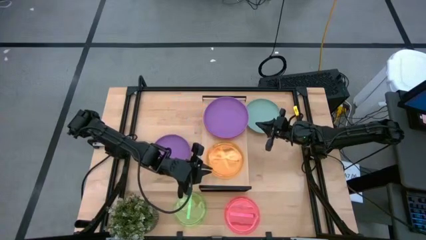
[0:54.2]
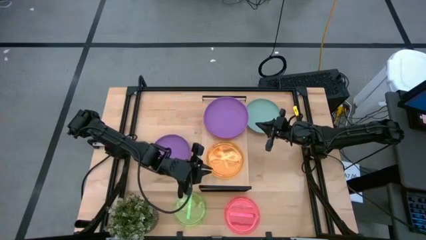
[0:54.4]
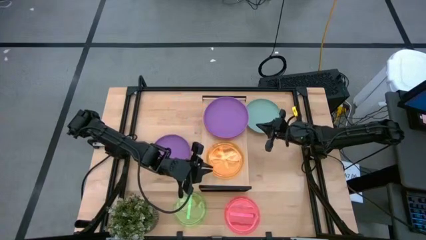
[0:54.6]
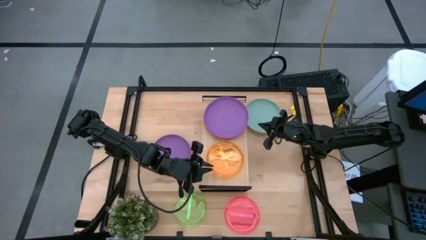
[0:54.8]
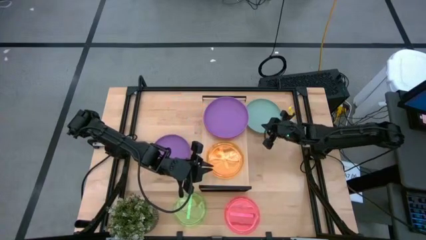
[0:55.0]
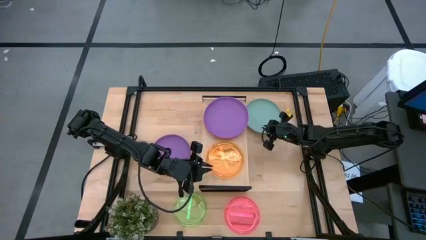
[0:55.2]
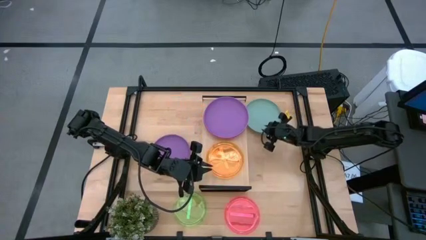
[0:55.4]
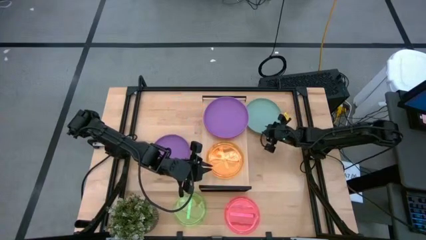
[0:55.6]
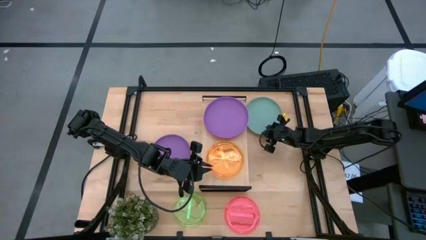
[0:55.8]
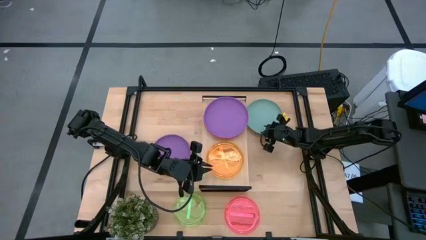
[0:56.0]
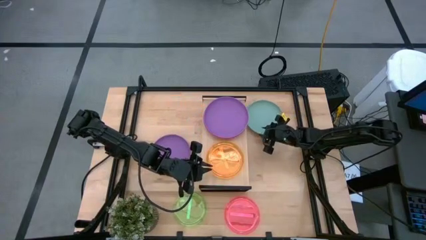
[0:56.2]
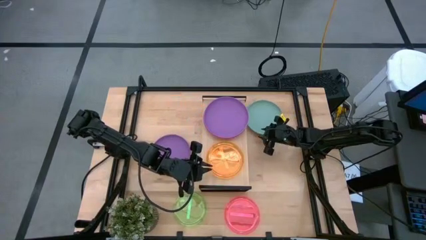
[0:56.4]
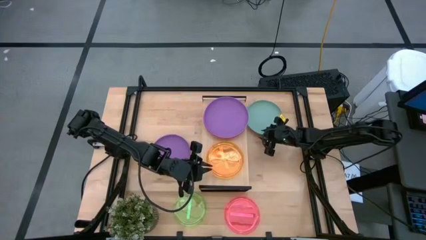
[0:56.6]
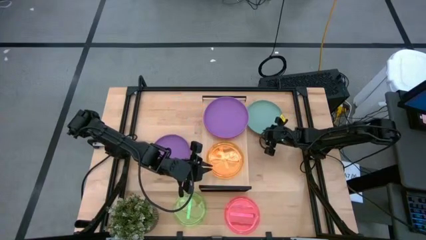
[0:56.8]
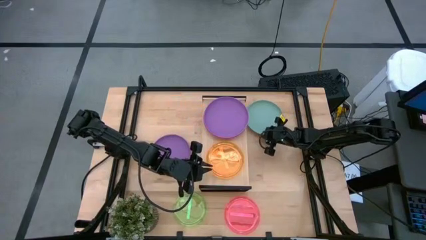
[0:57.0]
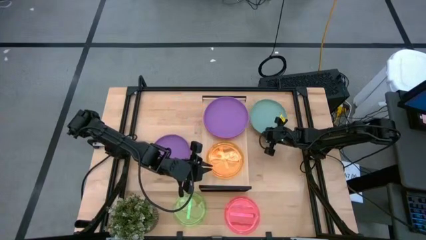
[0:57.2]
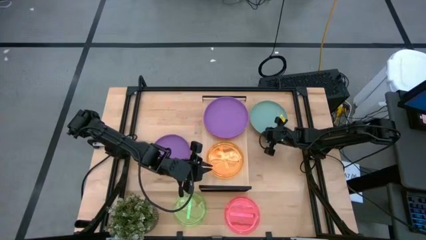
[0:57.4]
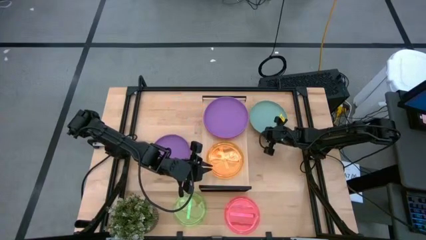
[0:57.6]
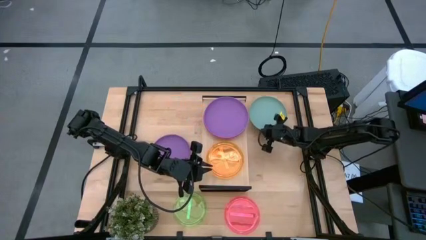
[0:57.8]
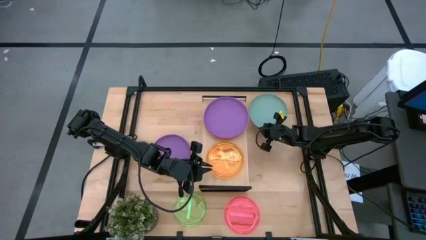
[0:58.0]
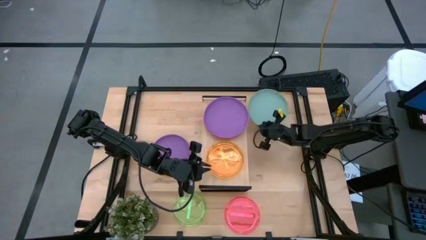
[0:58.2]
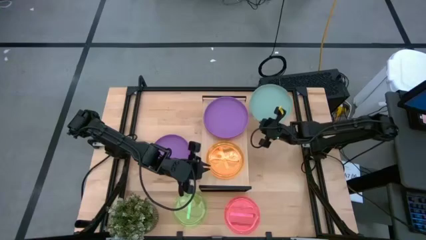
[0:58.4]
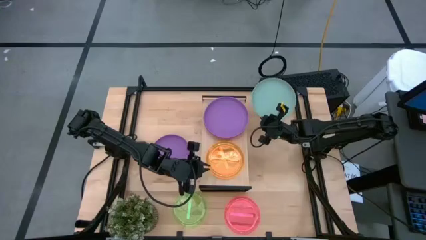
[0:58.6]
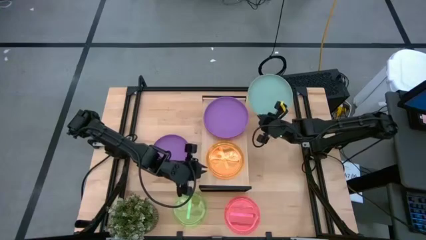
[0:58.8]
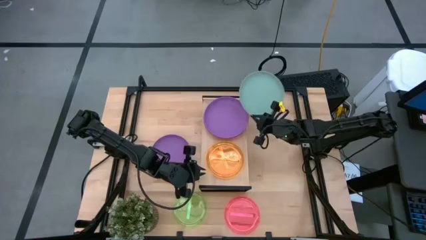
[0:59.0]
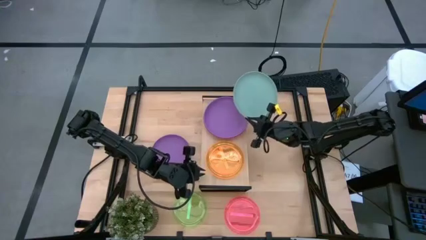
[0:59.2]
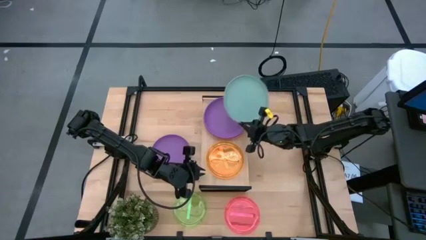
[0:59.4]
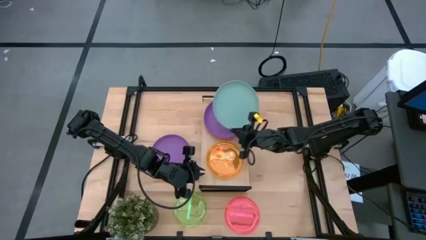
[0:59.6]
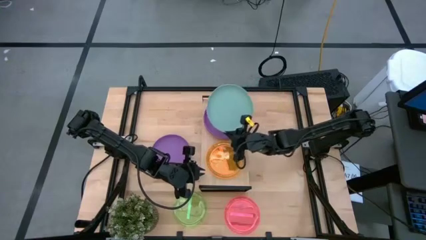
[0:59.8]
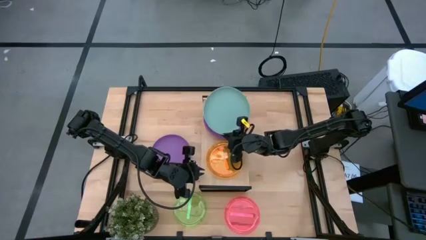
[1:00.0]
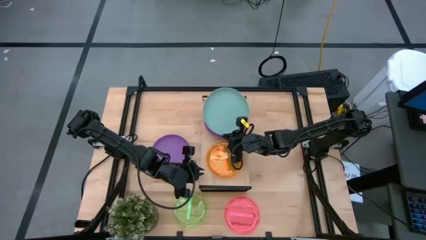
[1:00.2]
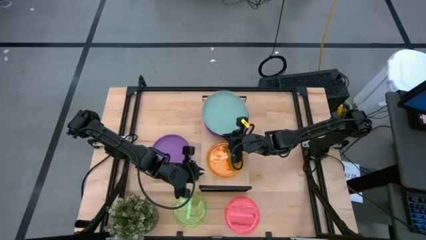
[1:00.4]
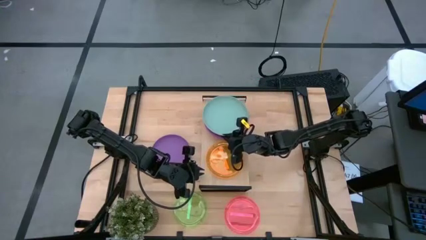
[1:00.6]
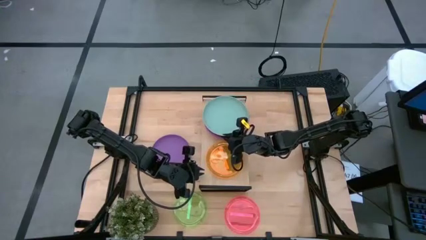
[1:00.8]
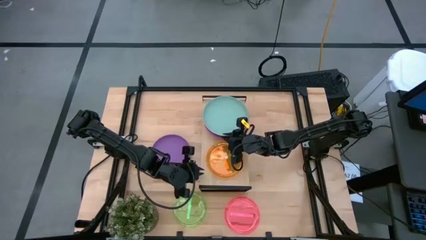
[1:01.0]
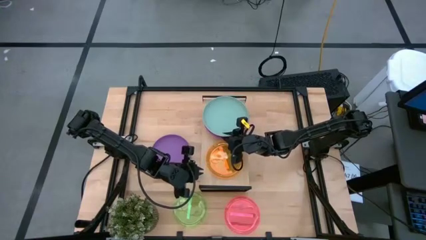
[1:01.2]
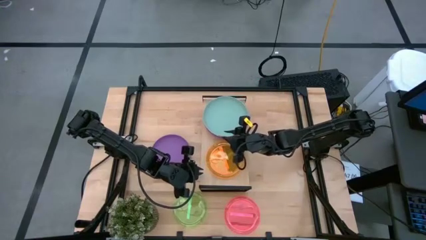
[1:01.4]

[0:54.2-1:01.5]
Task: Place and stack plates onto a shelf
Stack the light blue plate on top of the violet plate on the shelf

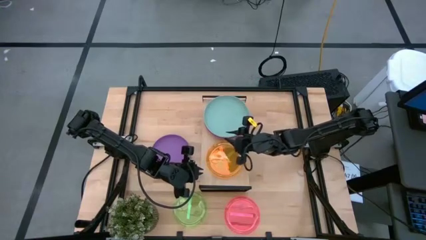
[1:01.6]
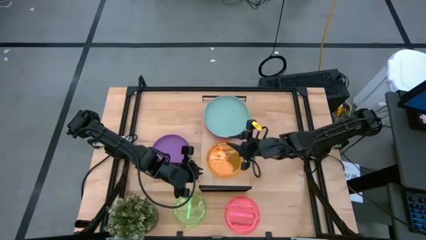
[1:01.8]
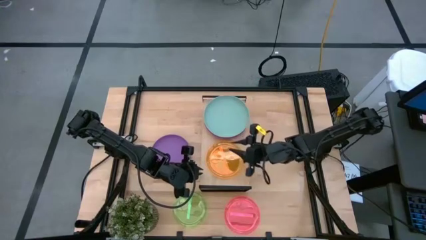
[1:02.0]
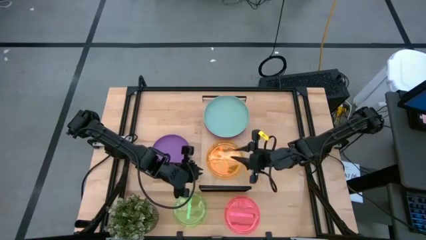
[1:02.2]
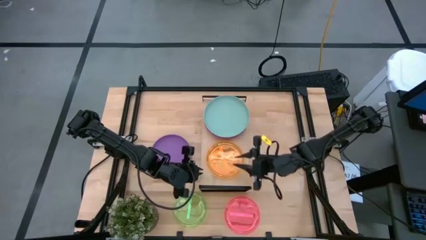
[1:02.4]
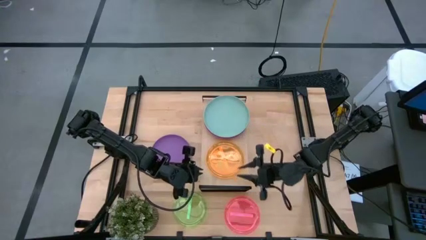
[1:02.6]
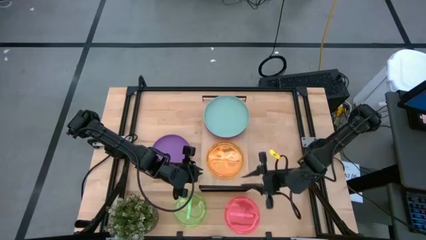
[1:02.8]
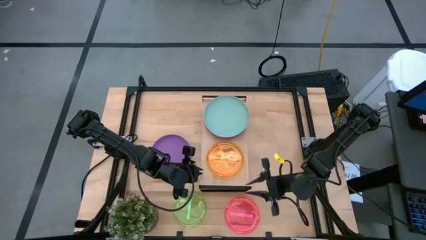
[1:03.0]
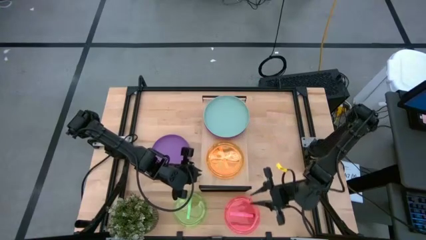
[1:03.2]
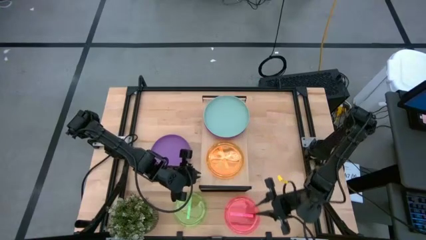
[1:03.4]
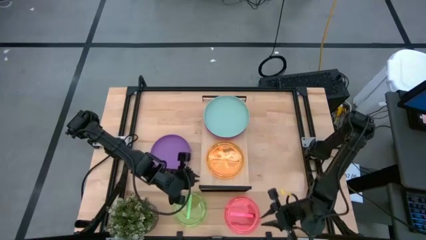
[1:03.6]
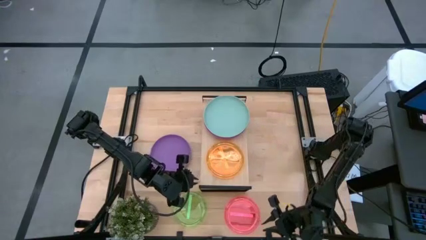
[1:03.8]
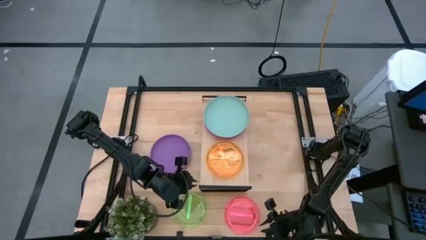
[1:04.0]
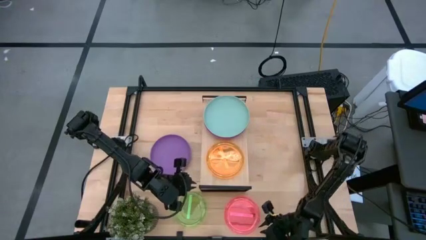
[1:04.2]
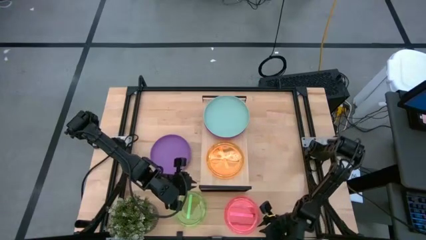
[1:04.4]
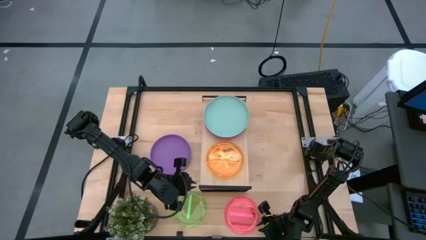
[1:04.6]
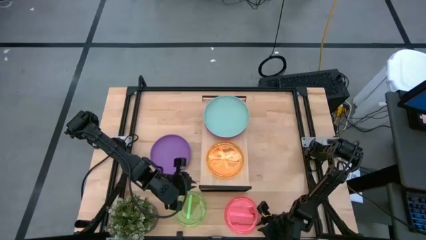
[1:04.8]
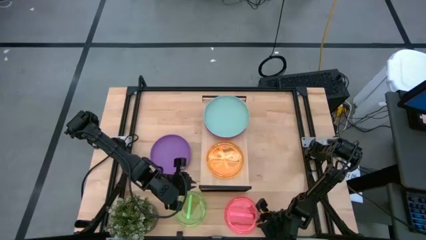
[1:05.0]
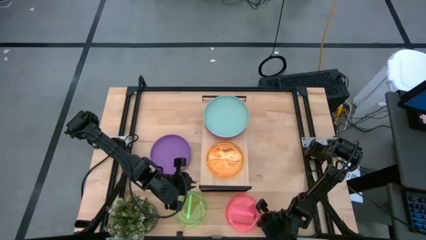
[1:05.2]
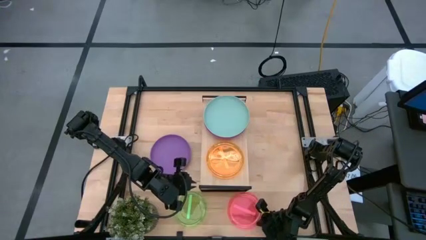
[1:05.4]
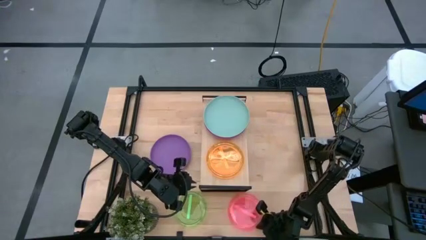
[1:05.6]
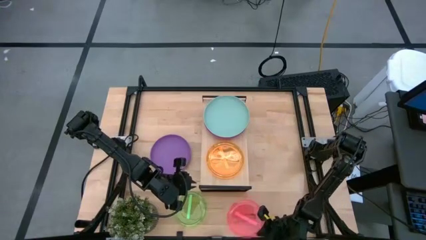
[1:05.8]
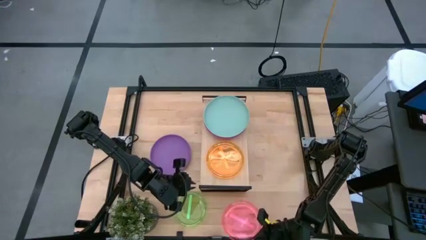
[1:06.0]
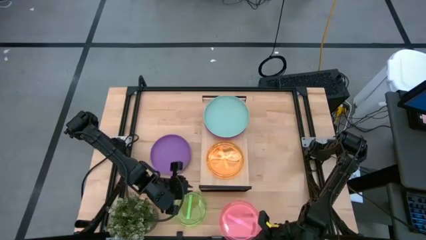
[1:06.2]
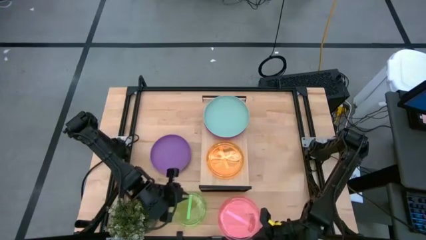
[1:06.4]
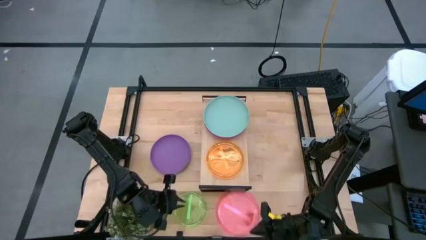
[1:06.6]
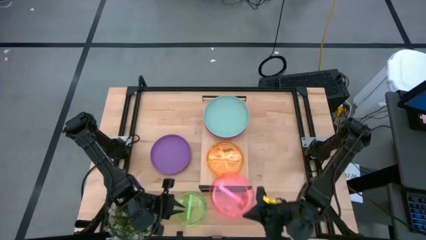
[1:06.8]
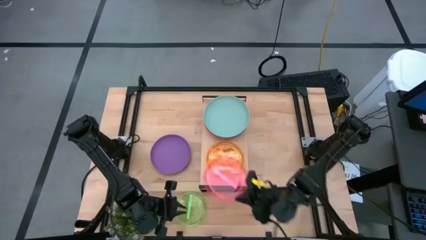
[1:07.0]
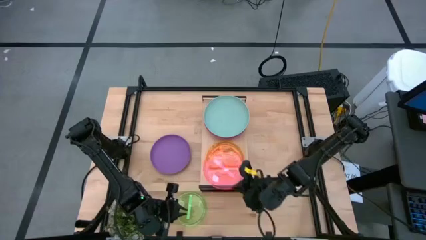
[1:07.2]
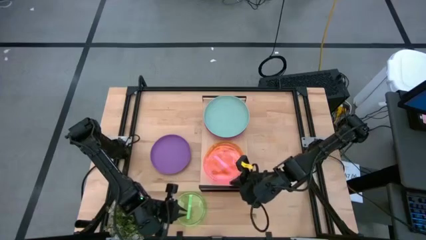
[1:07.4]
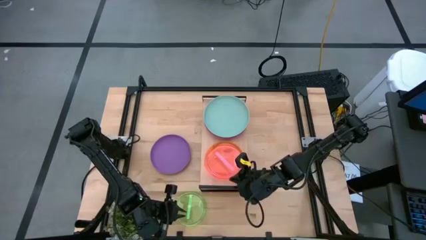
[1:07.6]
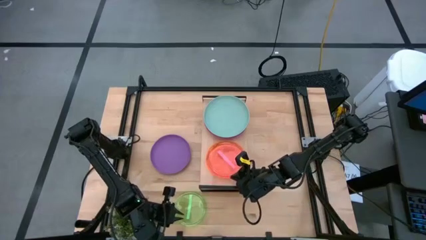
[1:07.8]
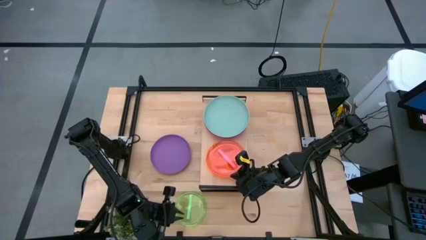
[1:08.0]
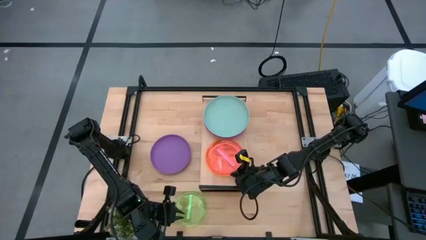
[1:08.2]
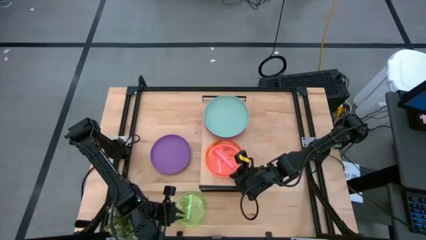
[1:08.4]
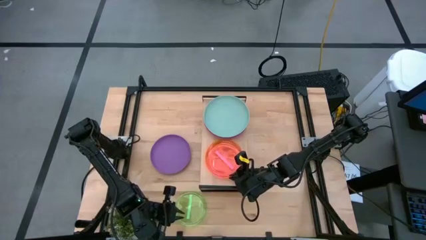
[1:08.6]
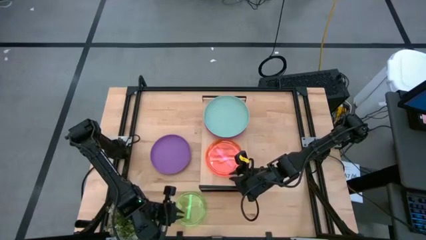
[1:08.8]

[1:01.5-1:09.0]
Stack the transparent pink plate on top of the transparent orange plate on the shelf
